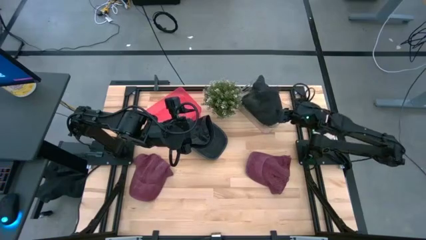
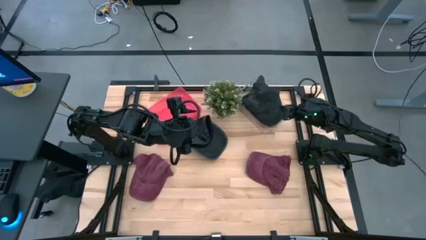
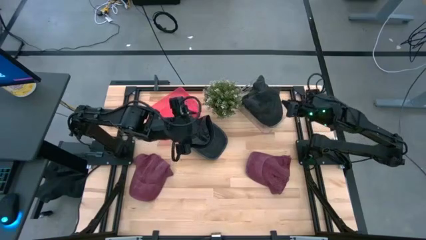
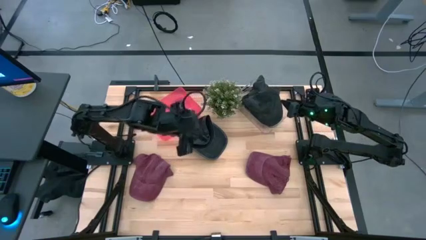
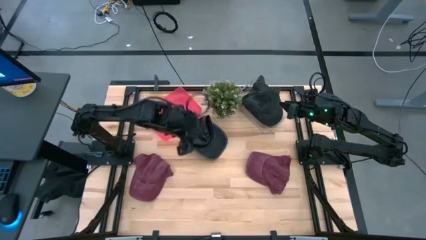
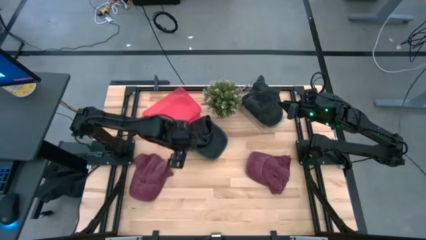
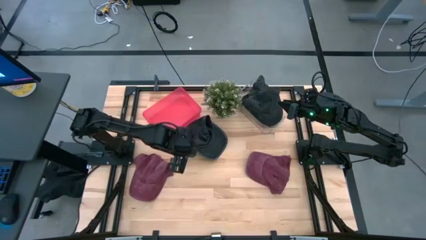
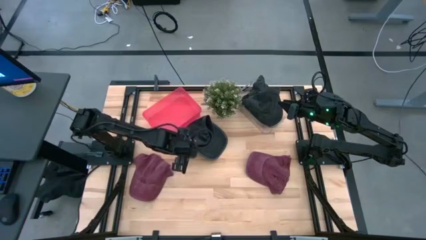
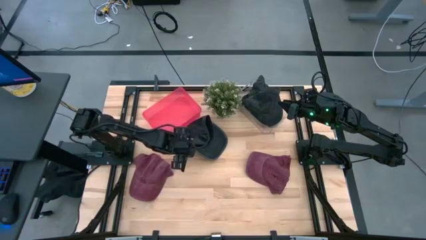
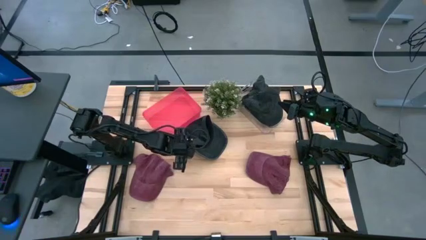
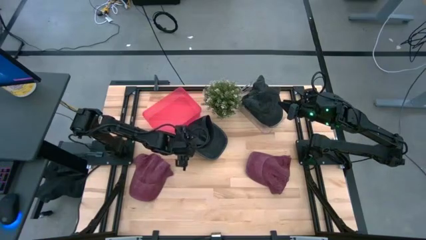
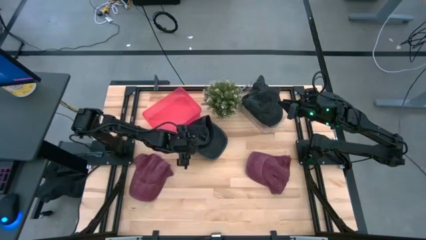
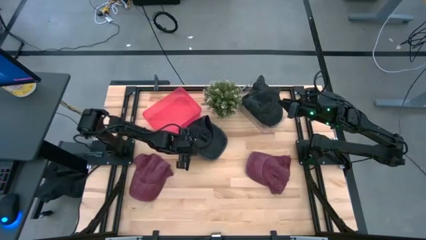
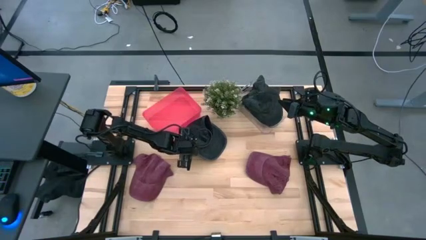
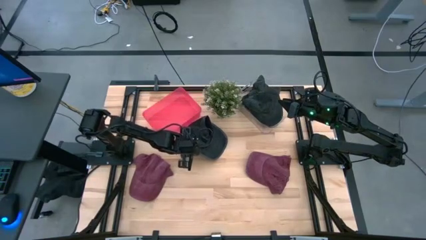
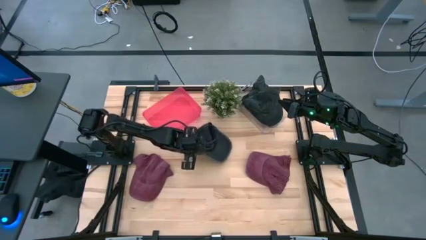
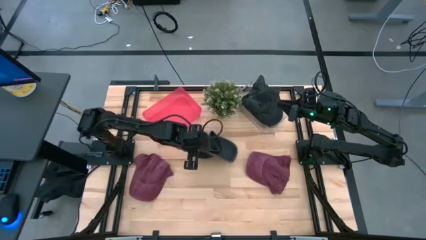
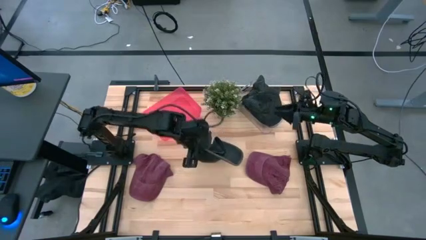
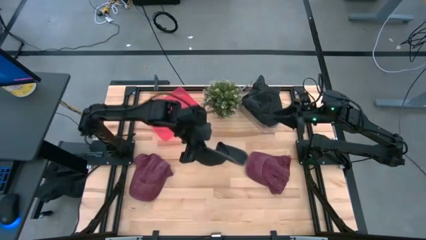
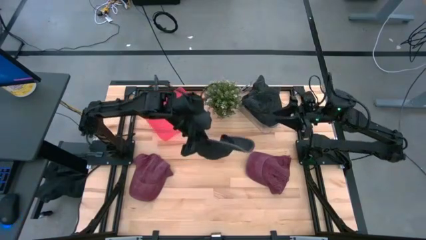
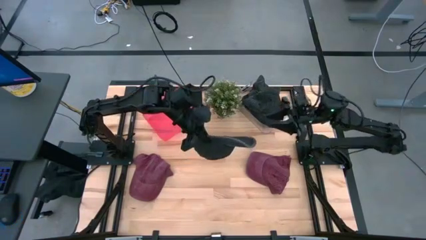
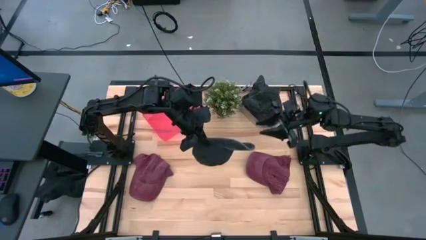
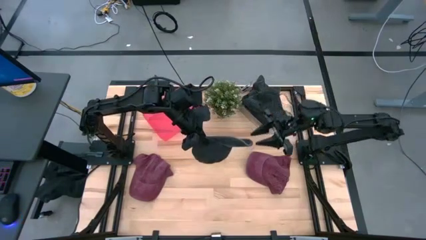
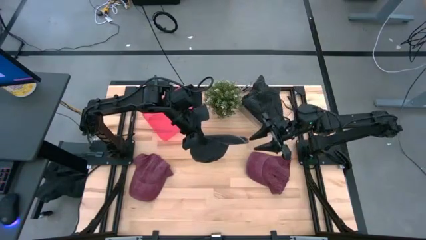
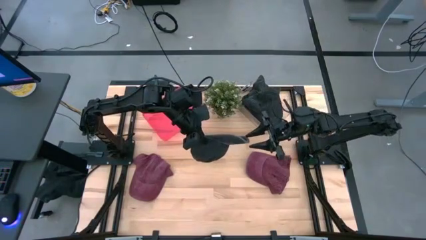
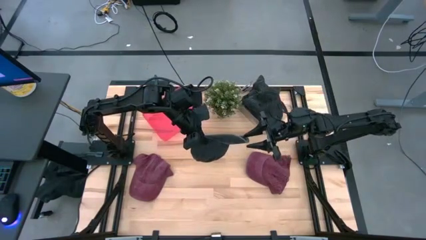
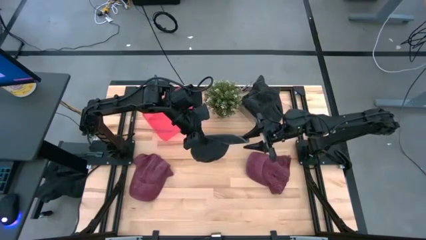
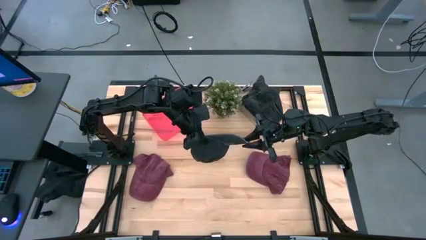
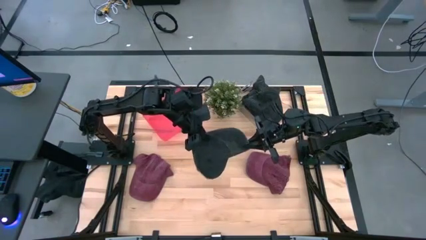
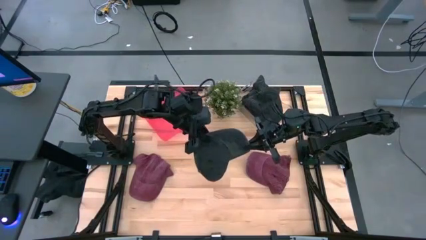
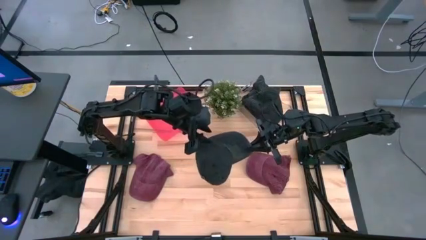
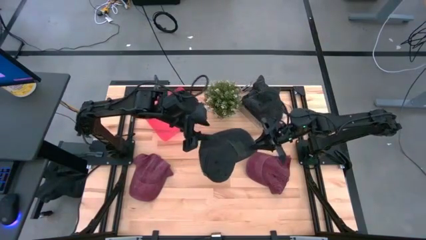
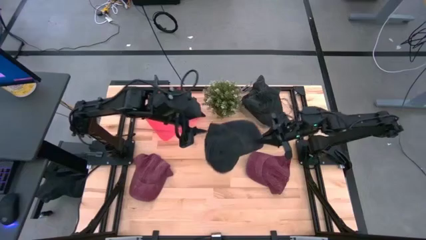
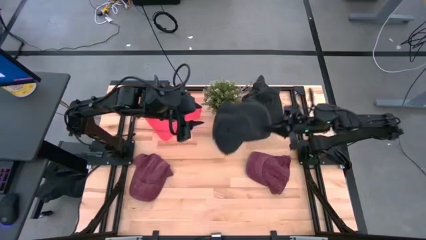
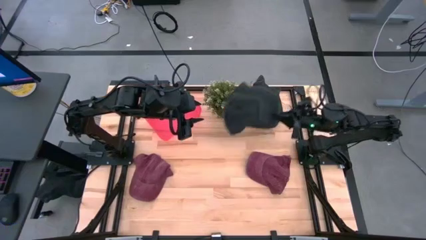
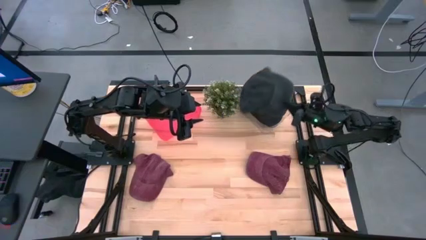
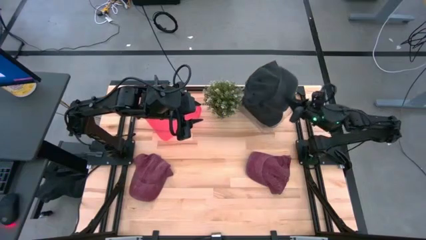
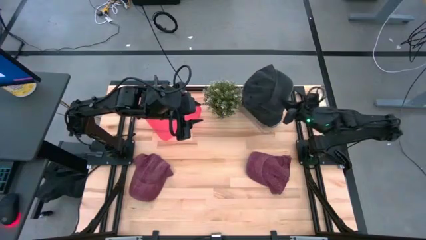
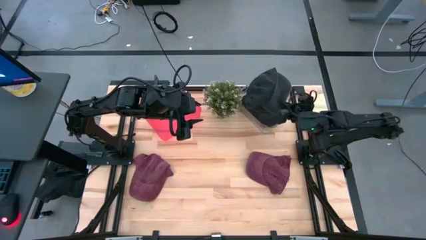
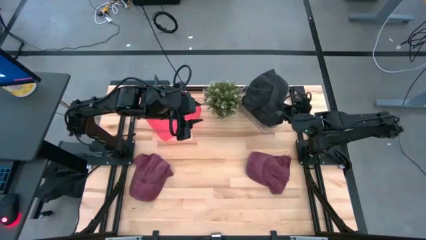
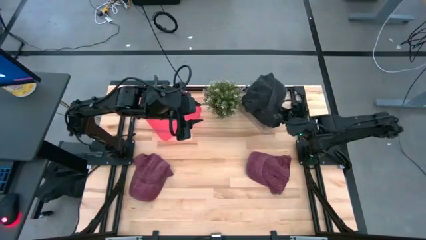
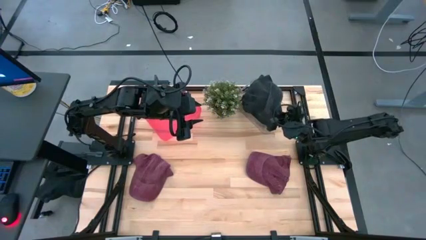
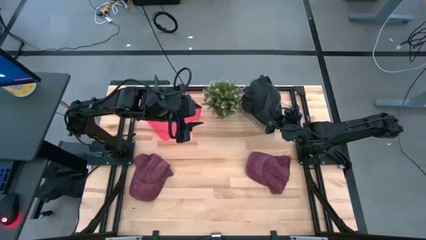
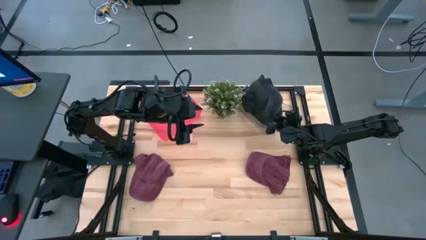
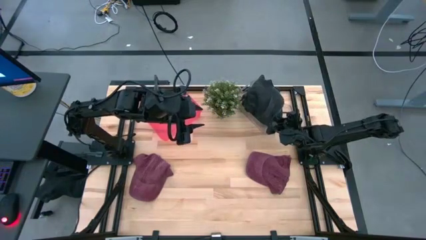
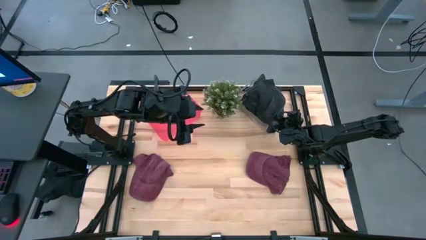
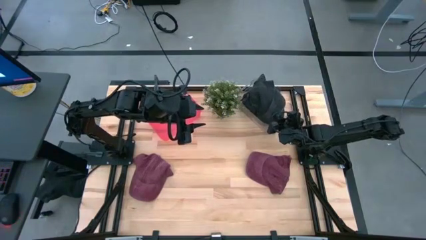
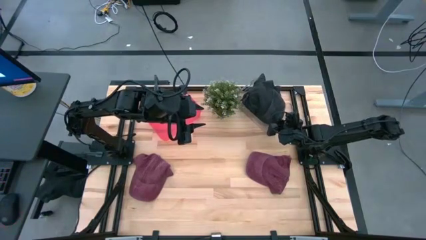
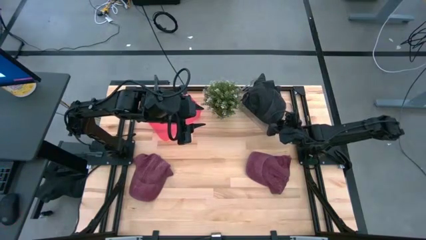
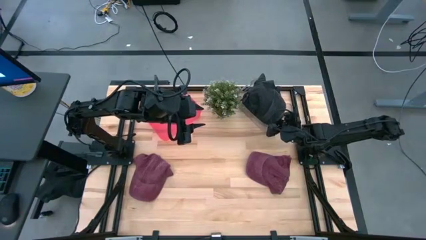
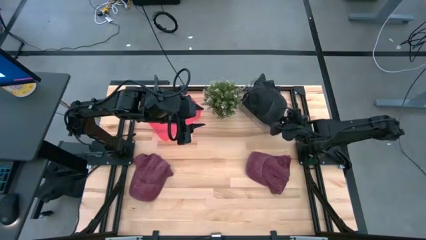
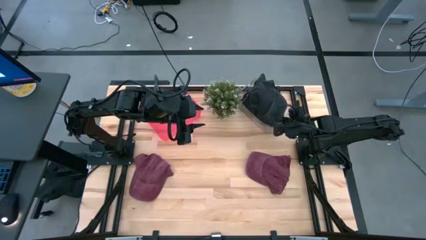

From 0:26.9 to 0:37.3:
Task: Pick & Place hat
Put the black cap into the transparent bin
